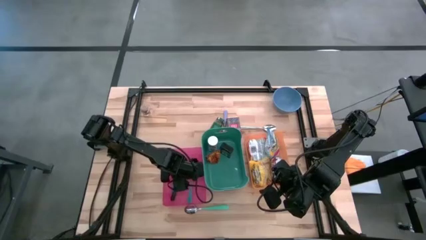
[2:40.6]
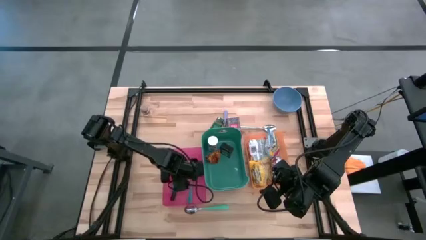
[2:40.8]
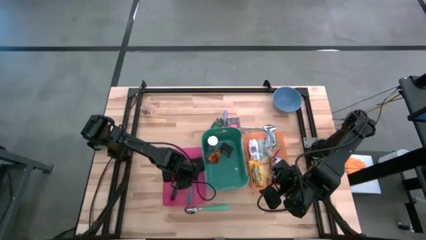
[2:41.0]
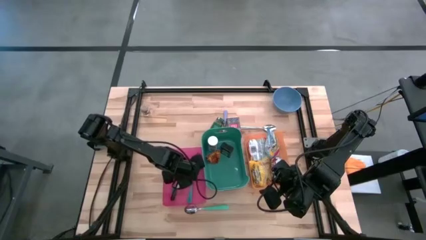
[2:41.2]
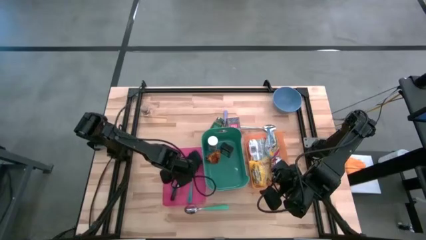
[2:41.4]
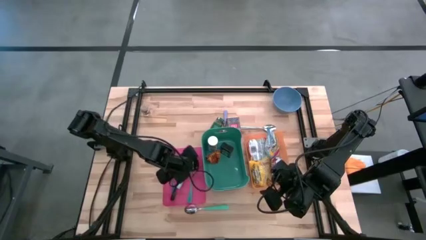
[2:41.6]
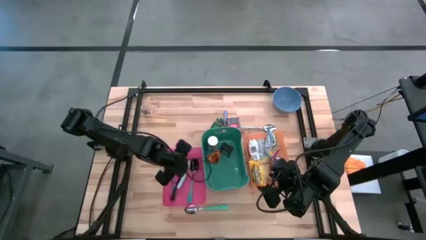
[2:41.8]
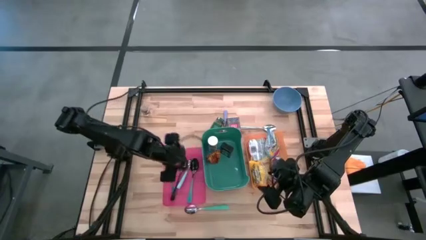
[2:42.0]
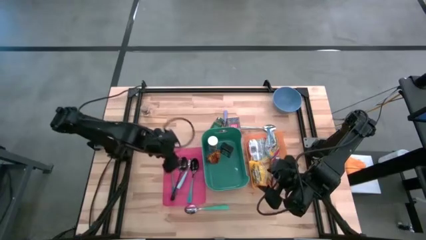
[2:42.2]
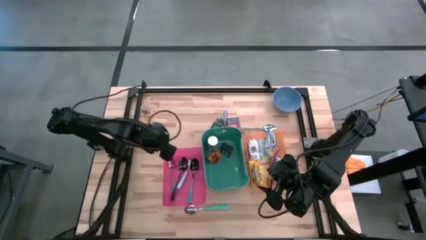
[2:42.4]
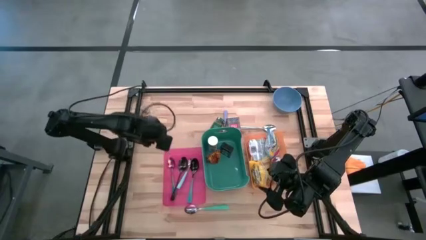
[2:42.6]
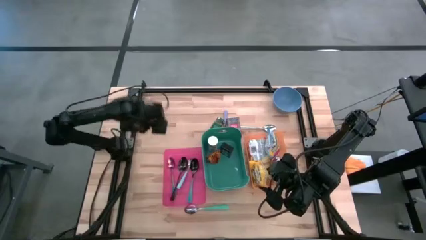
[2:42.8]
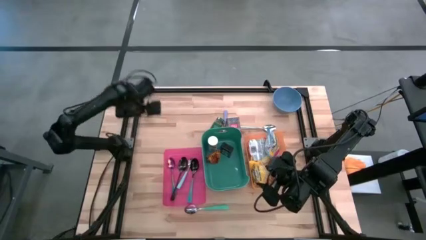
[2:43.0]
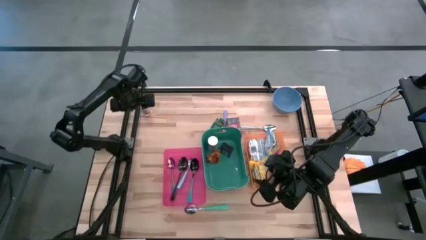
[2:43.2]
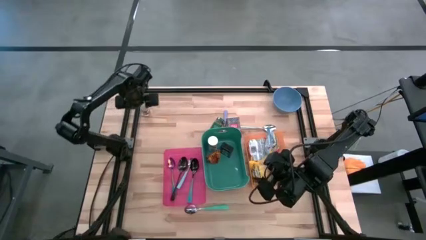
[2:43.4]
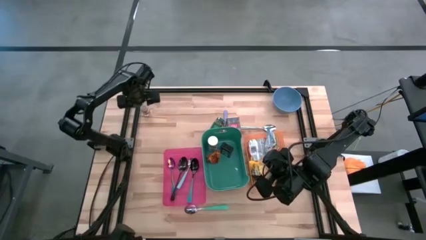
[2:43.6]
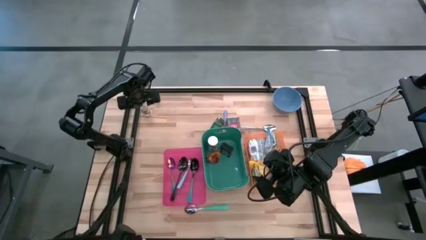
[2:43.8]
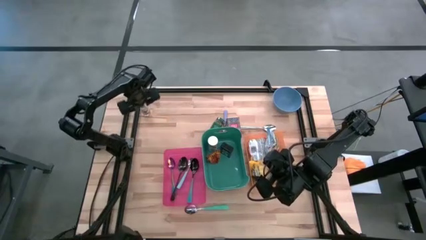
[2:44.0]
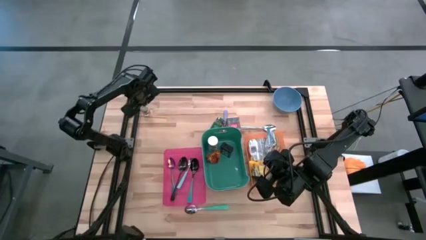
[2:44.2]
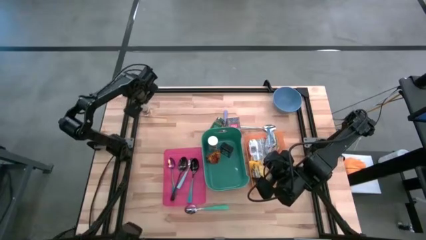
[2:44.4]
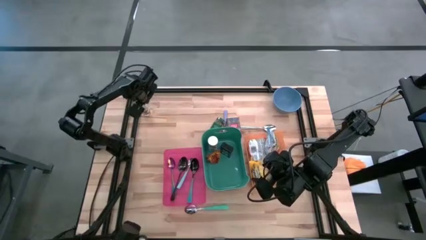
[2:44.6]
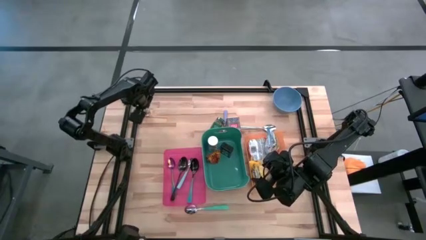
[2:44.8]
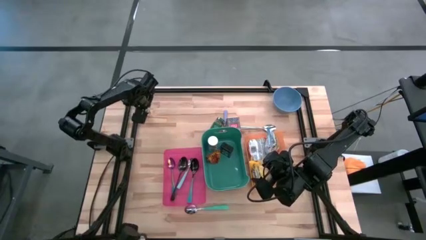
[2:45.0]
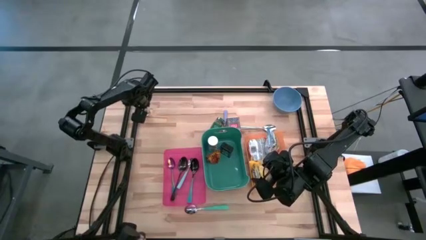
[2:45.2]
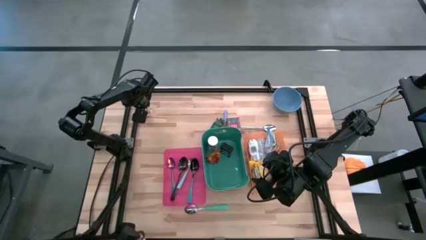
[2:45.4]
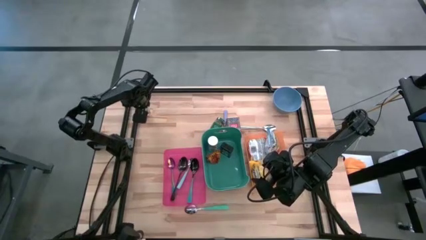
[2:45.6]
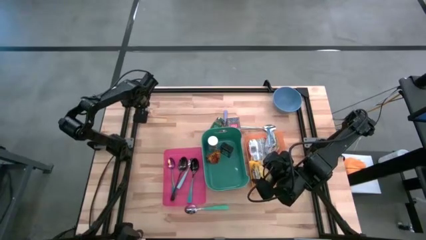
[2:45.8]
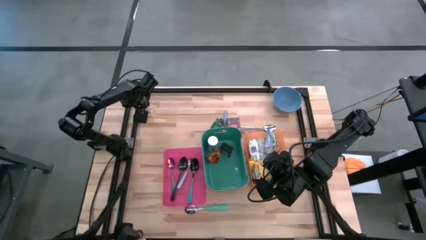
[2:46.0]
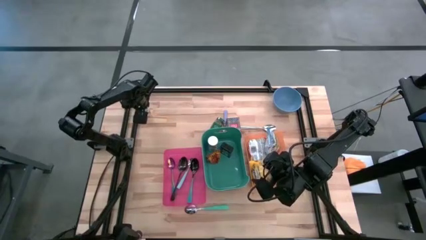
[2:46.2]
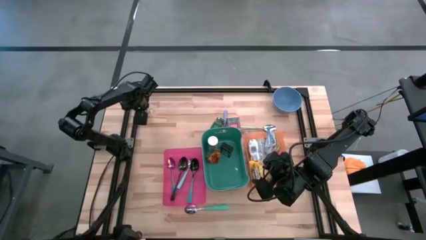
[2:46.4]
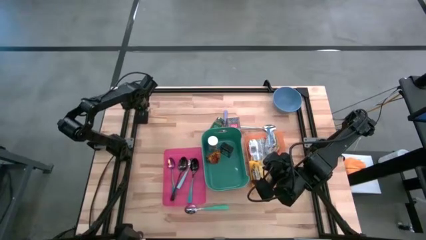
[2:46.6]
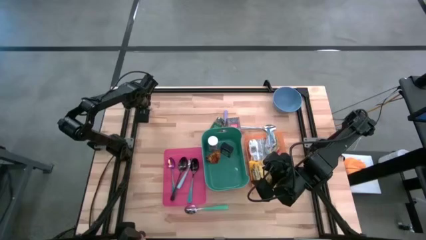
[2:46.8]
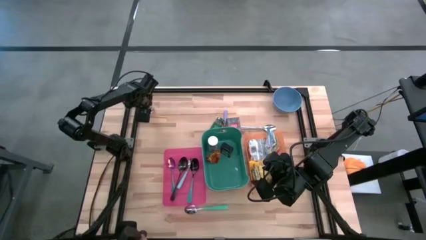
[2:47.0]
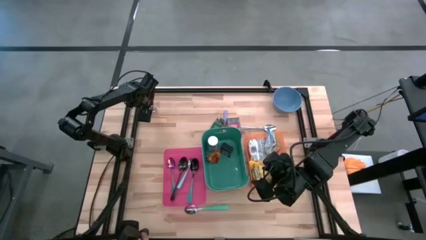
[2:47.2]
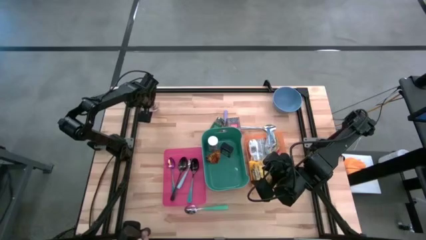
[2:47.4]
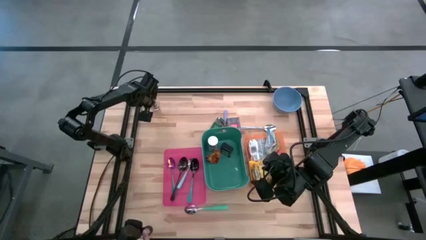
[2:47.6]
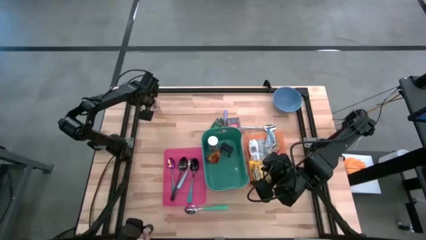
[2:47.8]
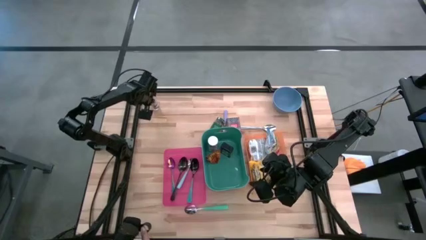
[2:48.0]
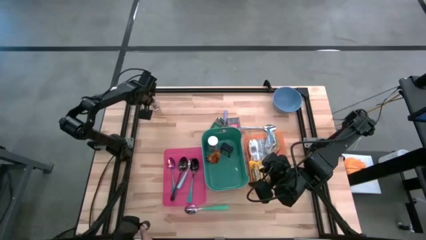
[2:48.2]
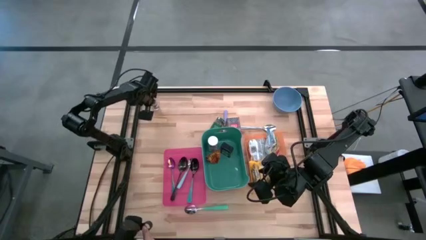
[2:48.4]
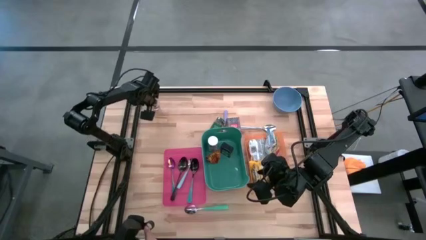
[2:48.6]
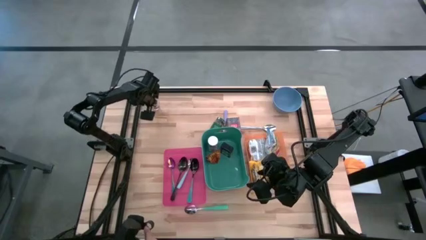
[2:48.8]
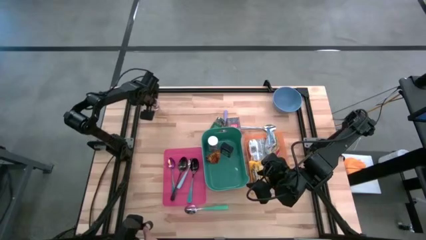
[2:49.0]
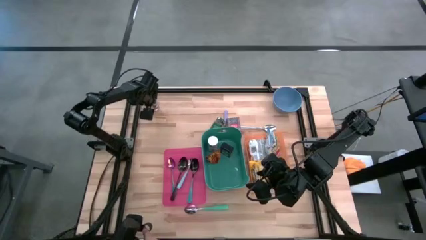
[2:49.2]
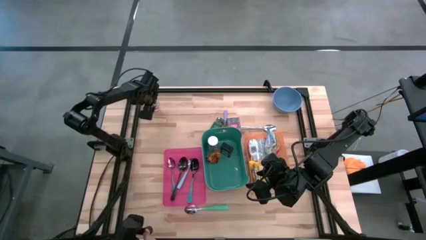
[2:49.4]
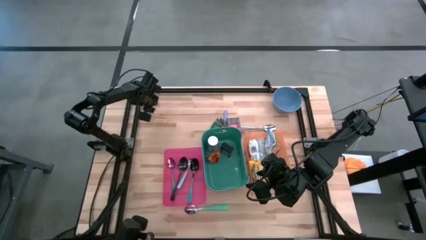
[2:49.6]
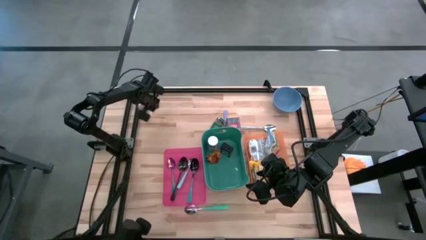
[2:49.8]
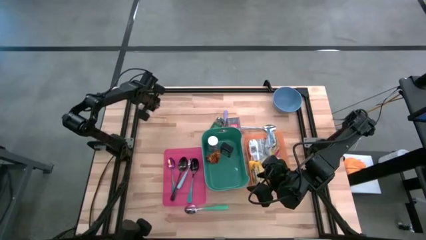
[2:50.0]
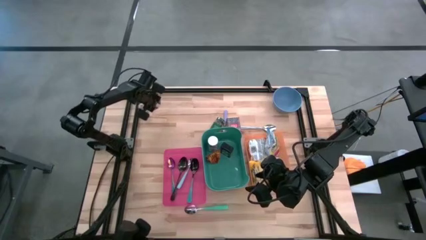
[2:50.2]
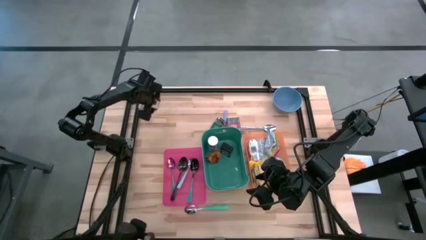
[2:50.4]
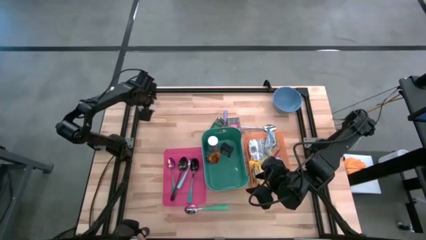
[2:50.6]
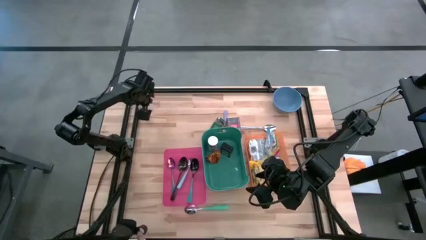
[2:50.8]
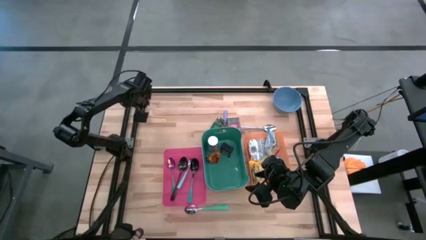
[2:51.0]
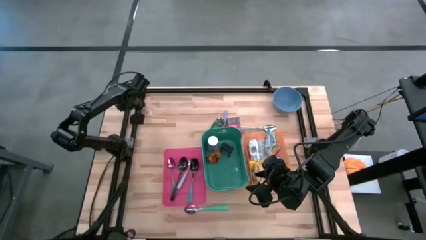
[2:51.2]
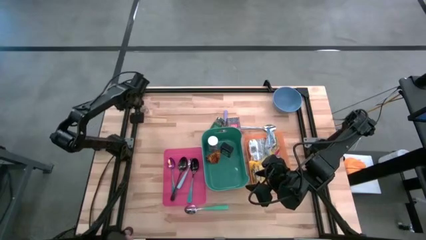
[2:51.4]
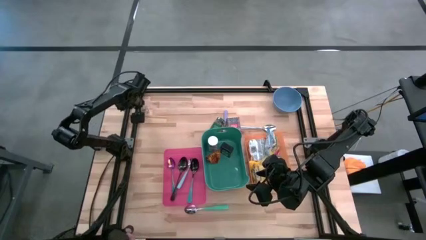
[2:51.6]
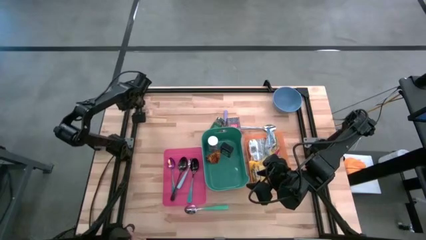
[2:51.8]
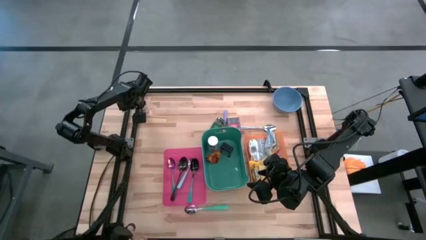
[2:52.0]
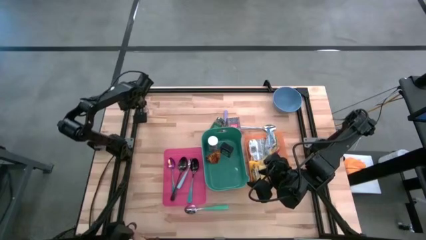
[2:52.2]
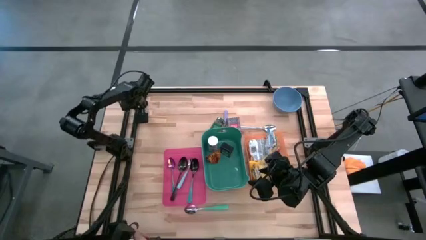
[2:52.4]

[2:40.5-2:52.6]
Put the brown seasoning bottle into the green bin
